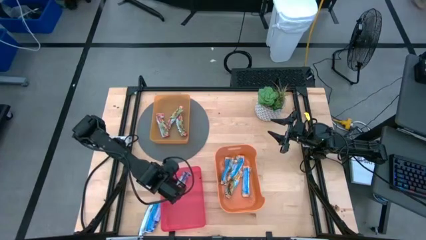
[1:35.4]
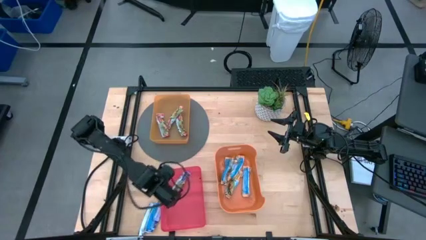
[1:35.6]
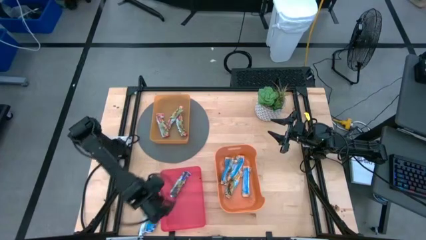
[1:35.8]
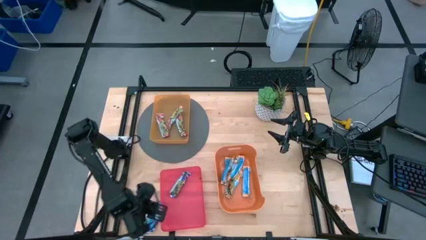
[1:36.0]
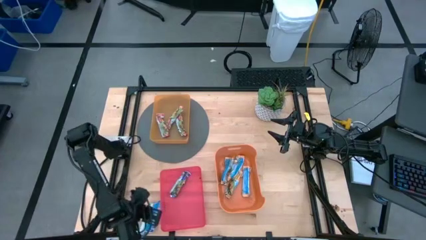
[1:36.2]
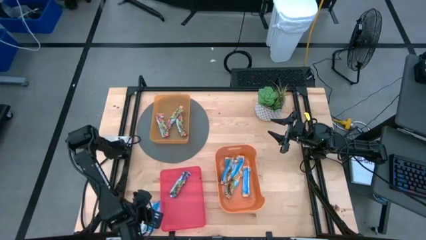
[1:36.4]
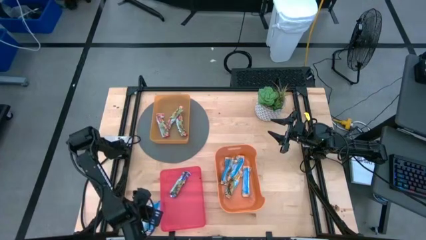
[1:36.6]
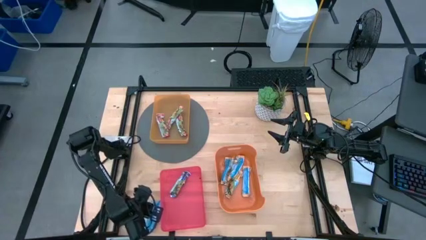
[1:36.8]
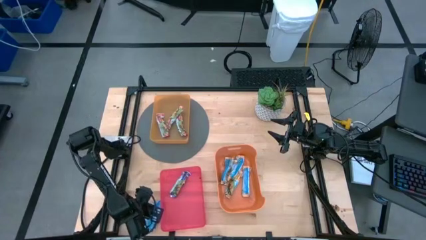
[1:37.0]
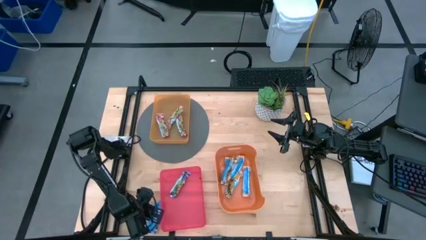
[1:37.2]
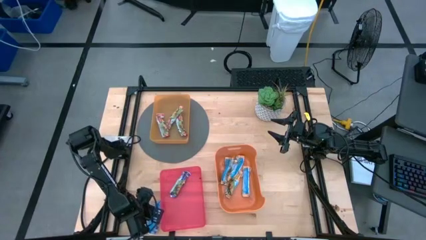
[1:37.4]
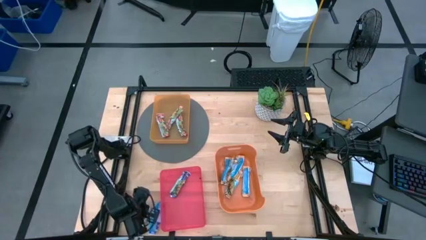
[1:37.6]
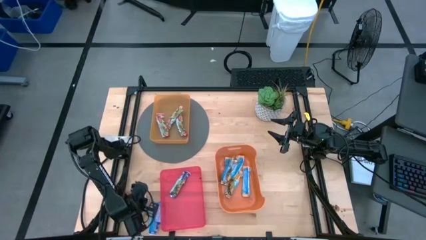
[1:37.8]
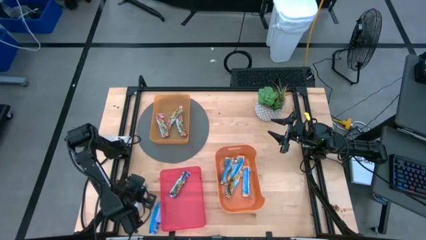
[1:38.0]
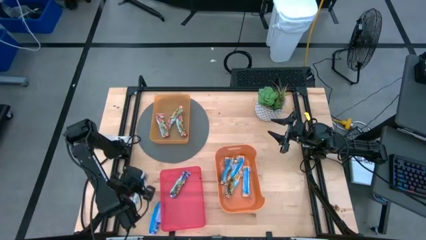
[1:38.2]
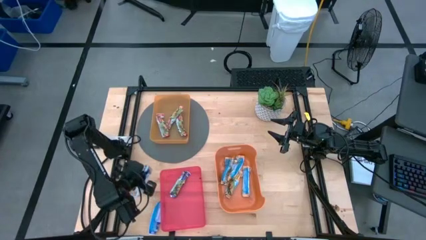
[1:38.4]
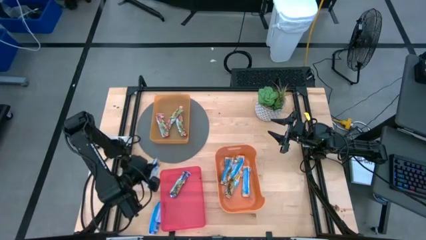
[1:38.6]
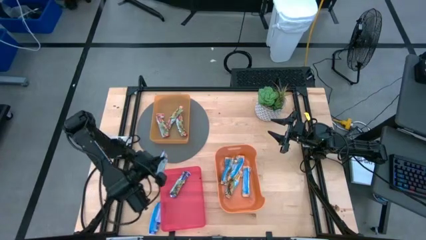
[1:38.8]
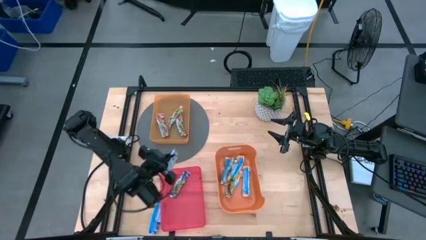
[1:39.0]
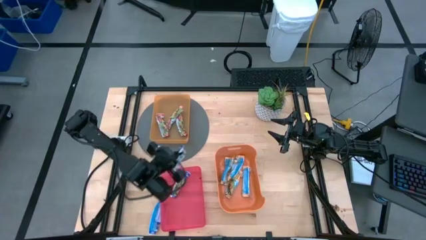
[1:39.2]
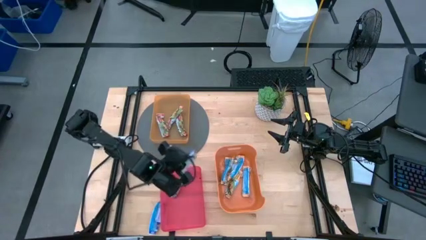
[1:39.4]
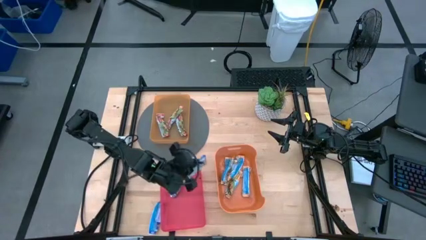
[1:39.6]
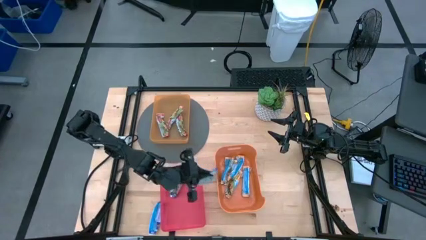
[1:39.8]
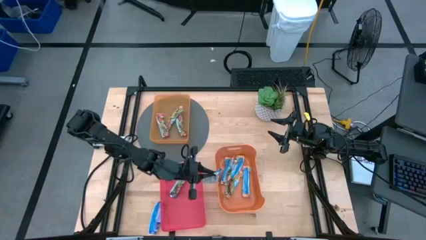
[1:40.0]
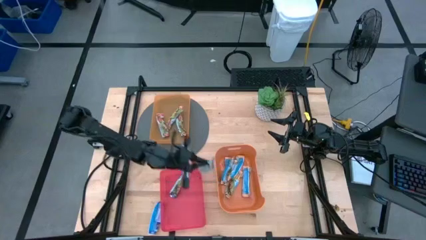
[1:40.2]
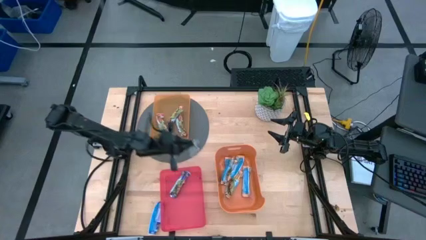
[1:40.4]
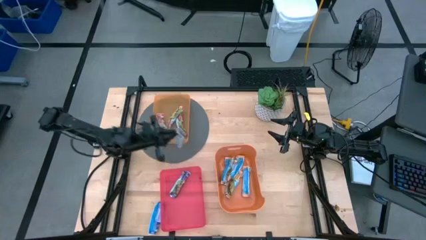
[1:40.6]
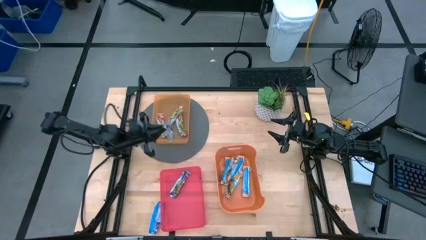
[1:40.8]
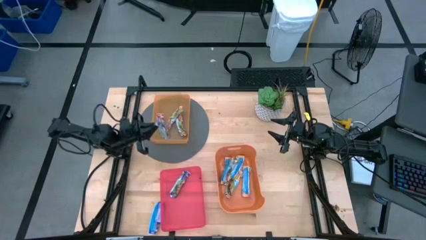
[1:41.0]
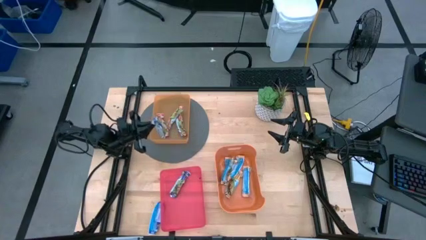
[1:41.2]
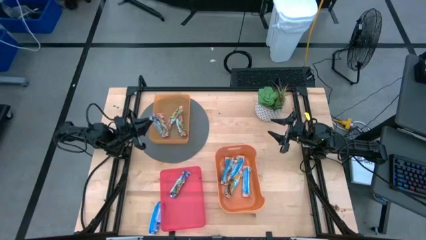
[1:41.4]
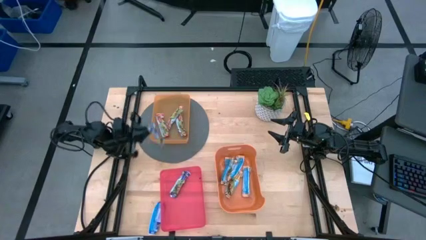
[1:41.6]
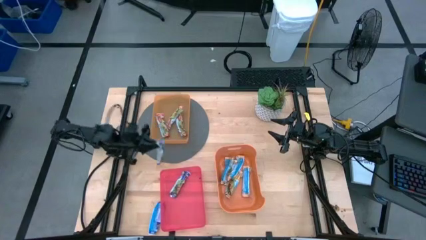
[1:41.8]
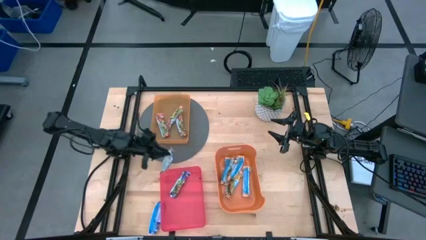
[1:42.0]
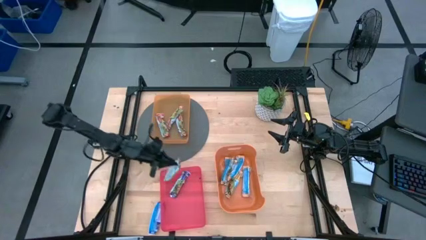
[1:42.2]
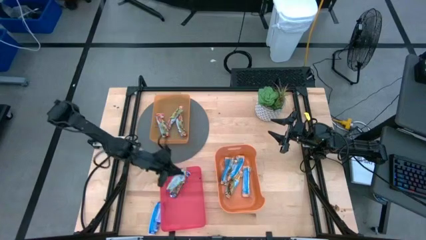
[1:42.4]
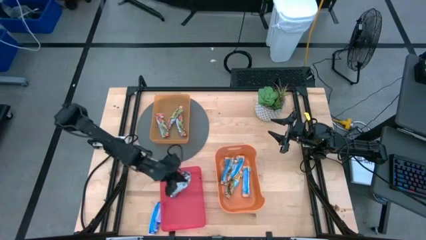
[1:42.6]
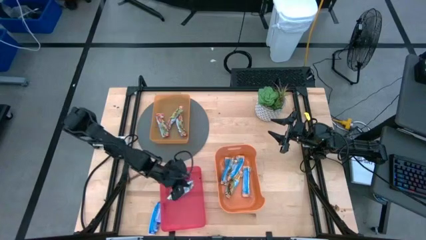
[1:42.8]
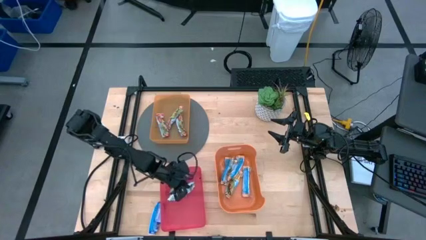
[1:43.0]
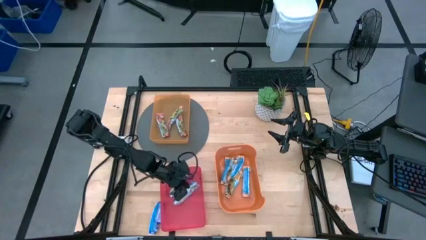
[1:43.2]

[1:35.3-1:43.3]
Task: Pick and place Granola Bars by type
Put the blue granola bar into the red bin

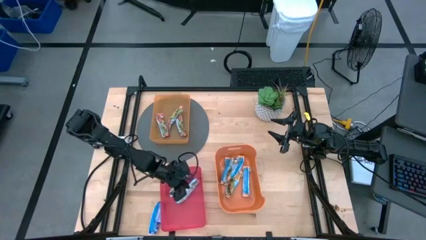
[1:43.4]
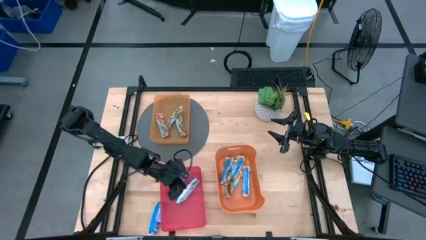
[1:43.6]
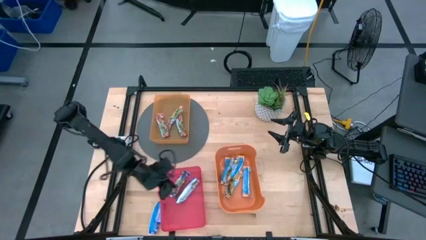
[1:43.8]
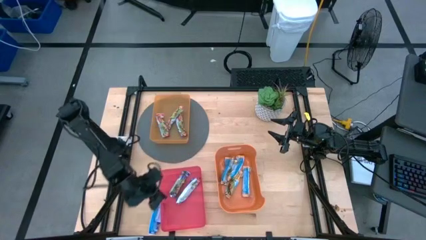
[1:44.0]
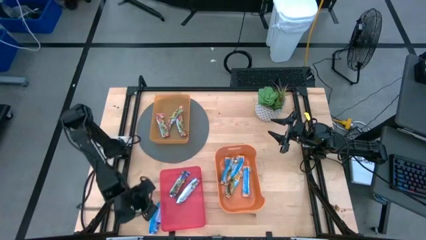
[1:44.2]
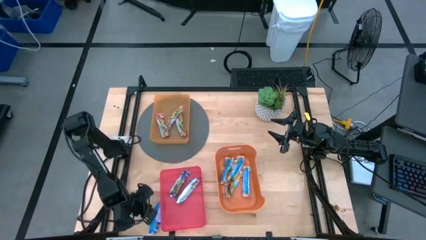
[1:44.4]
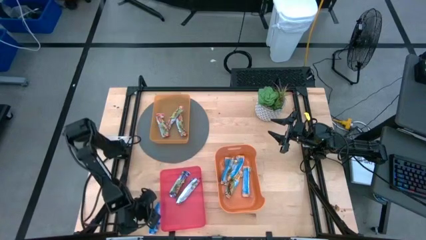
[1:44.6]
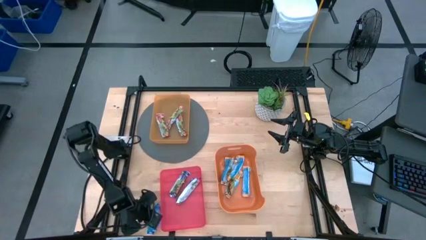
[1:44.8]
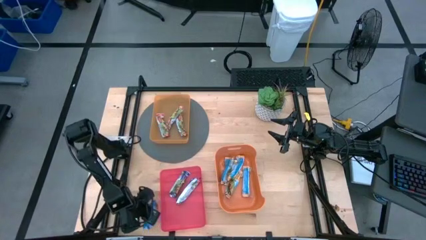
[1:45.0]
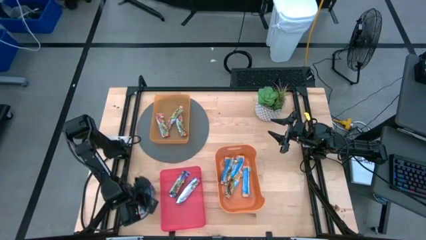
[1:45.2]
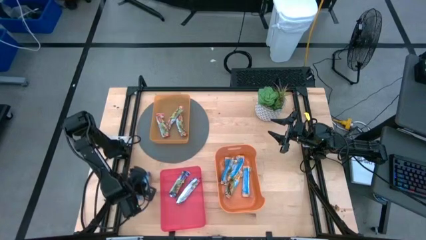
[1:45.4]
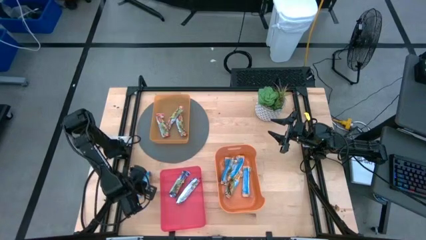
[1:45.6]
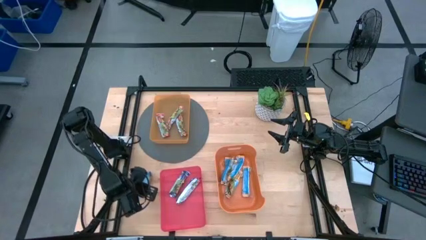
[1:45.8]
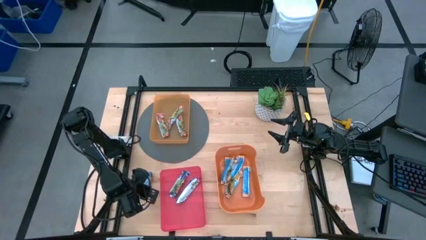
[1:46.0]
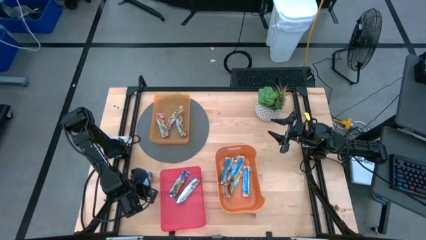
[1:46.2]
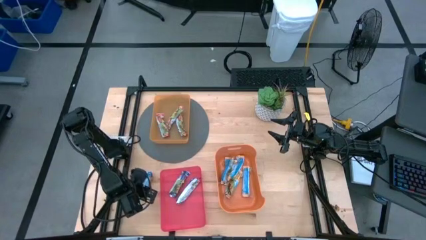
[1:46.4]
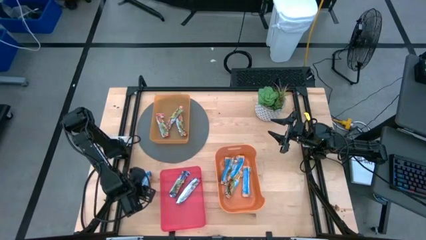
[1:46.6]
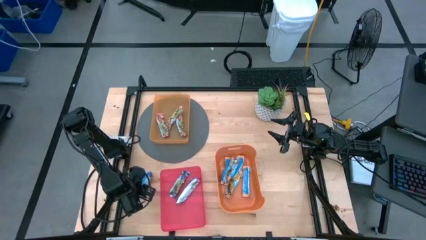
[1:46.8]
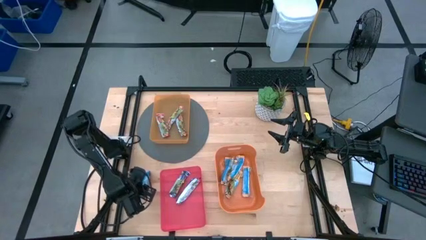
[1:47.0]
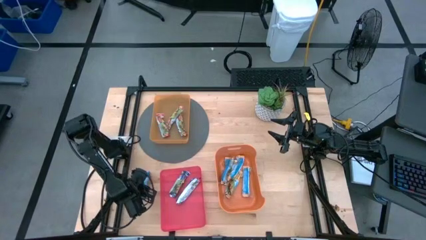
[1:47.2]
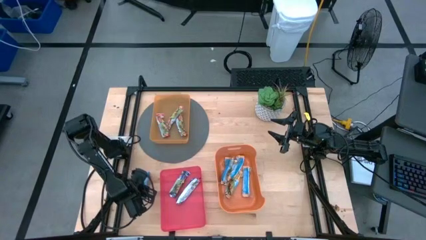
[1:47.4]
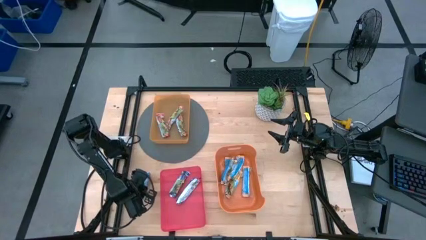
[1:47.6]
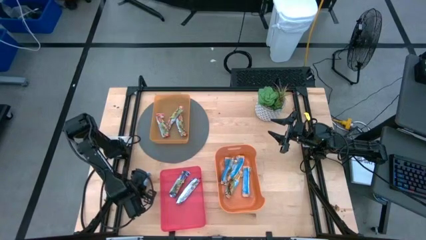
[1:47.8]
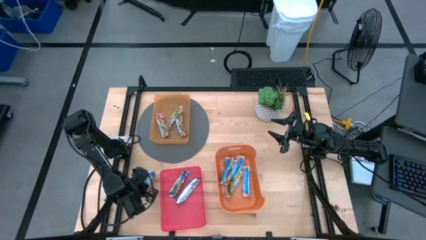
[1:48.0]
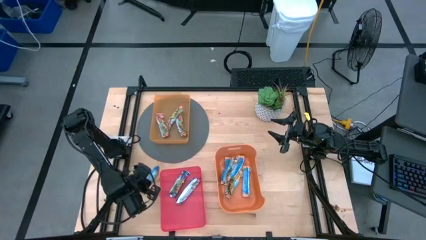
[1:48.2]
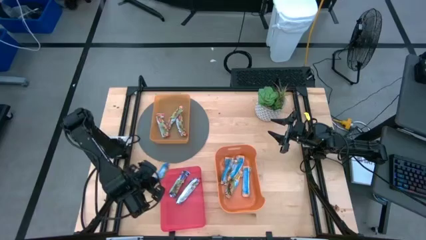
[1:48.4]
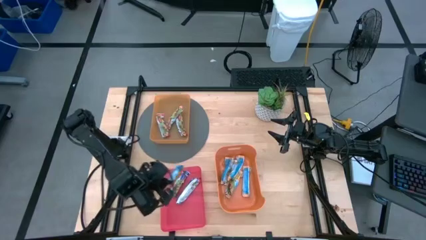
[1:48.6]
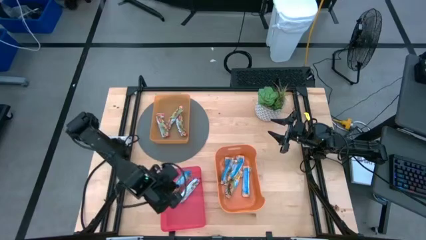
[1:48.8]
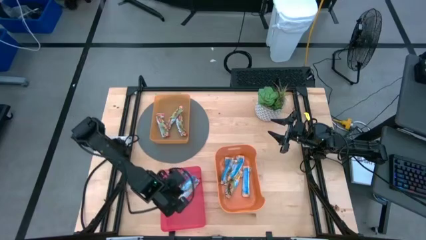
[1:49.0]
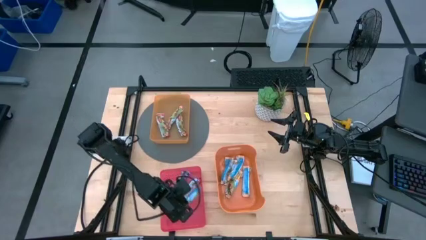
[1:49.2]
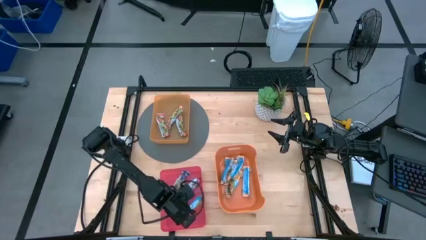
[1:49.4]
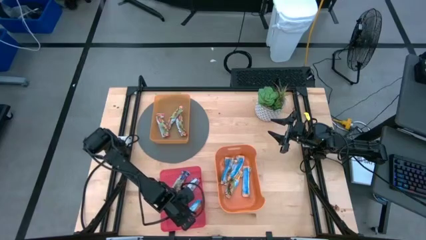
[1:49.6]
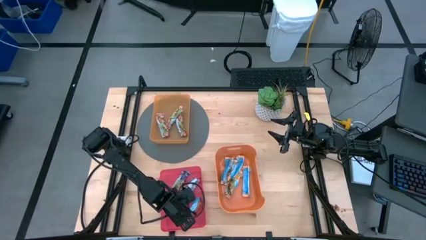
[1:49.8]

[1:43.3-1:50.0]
Put the blue granola bar into the red bin
